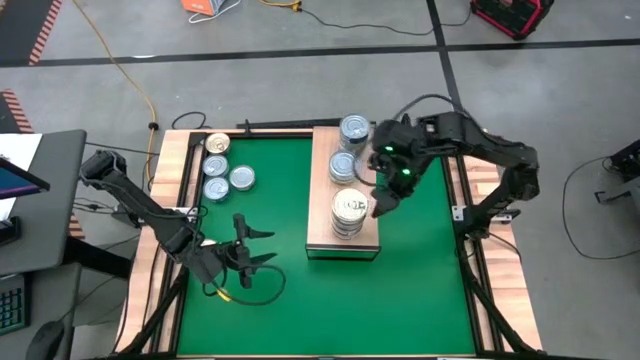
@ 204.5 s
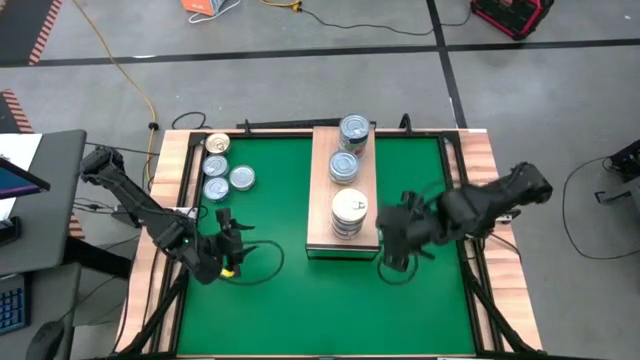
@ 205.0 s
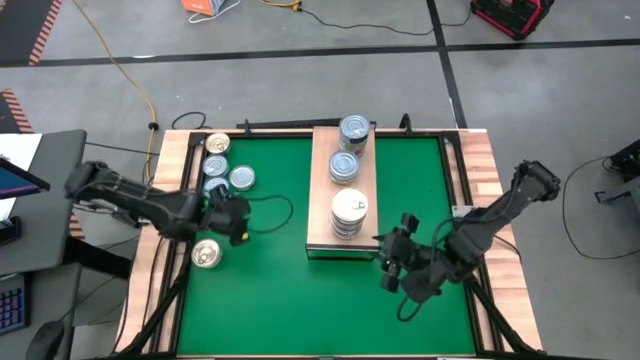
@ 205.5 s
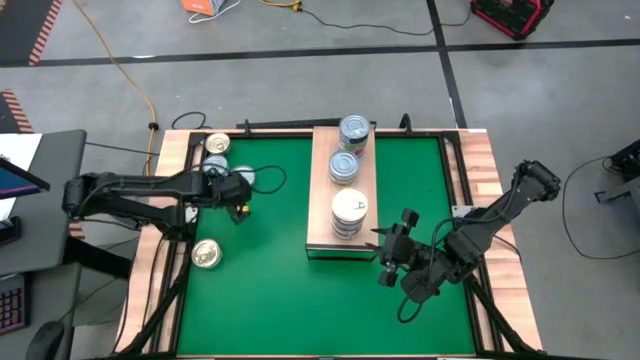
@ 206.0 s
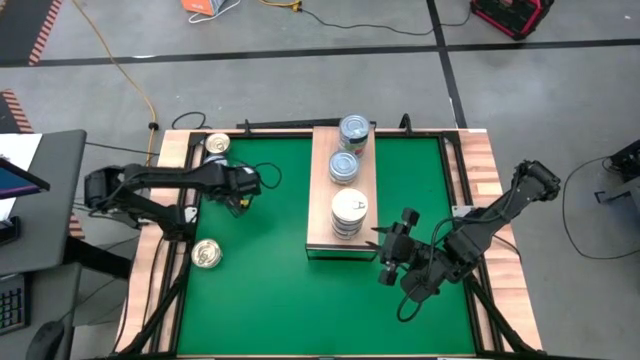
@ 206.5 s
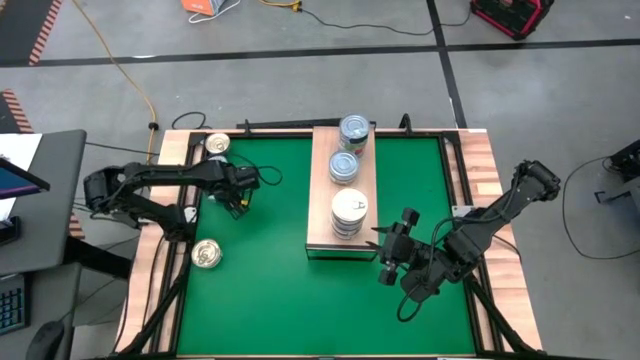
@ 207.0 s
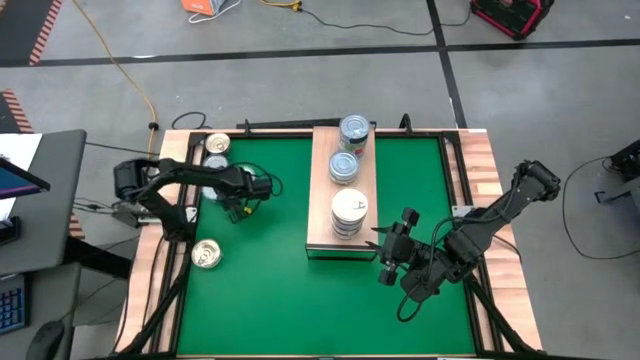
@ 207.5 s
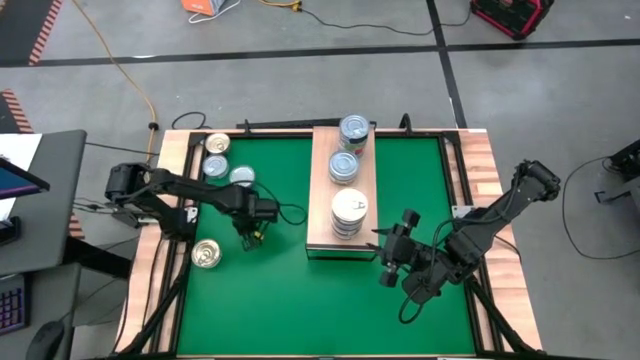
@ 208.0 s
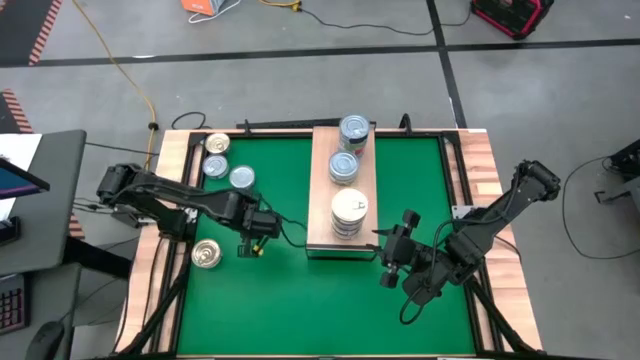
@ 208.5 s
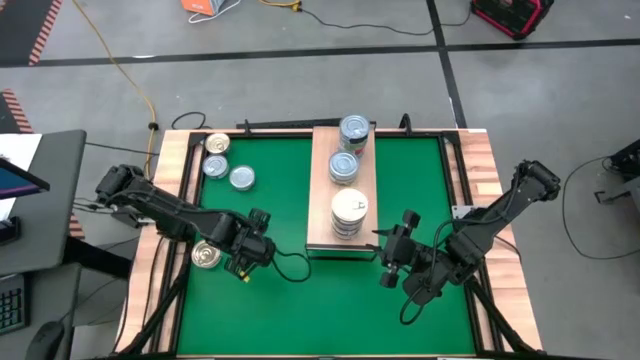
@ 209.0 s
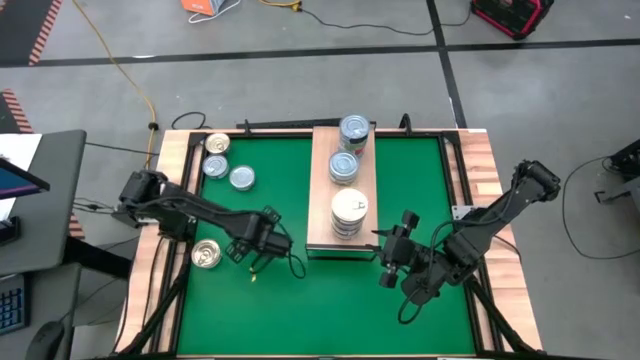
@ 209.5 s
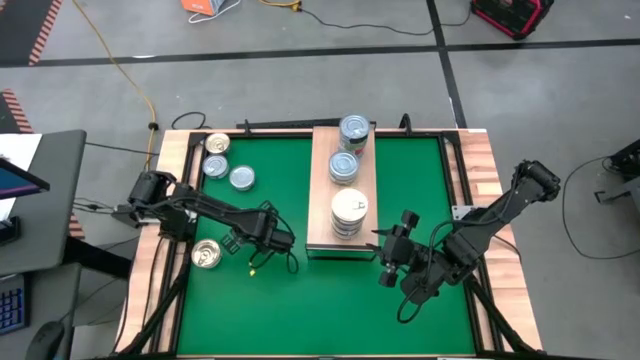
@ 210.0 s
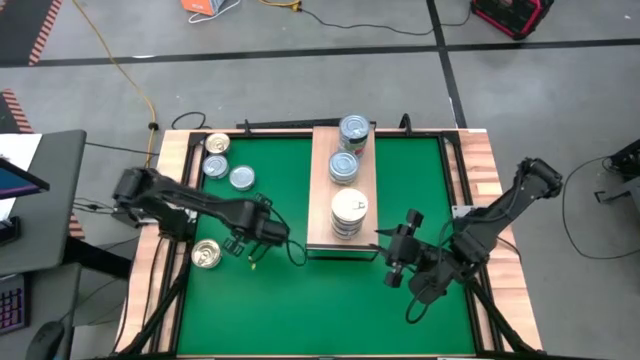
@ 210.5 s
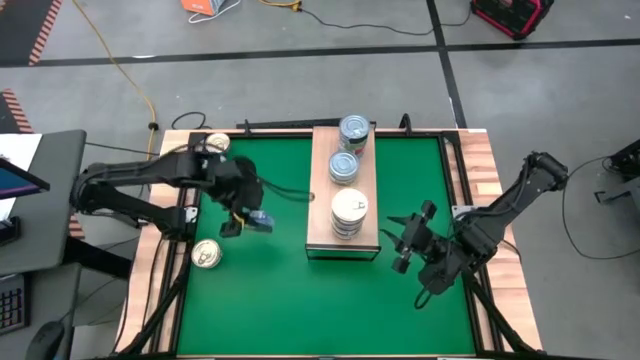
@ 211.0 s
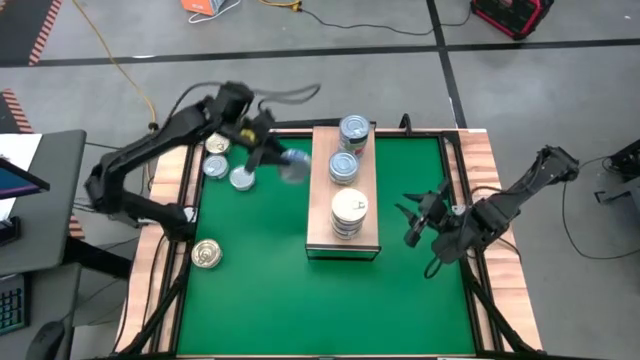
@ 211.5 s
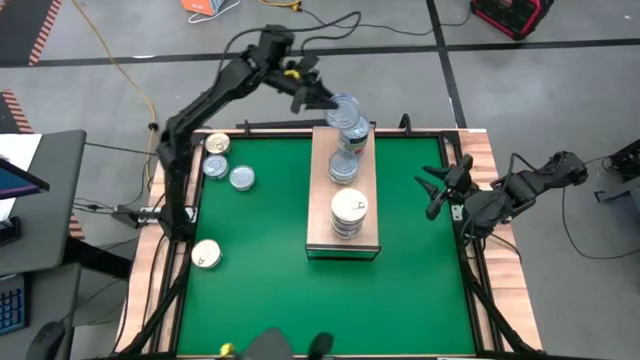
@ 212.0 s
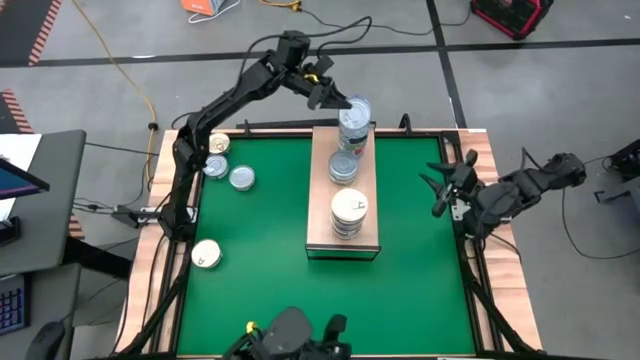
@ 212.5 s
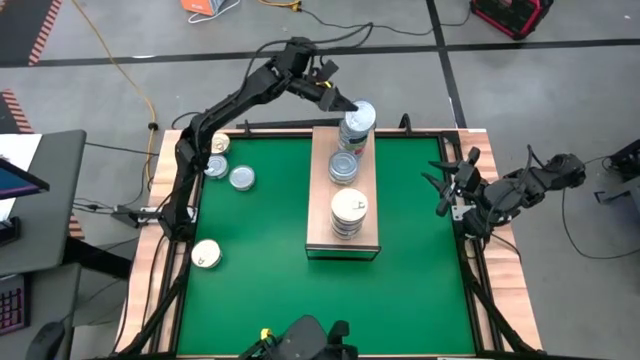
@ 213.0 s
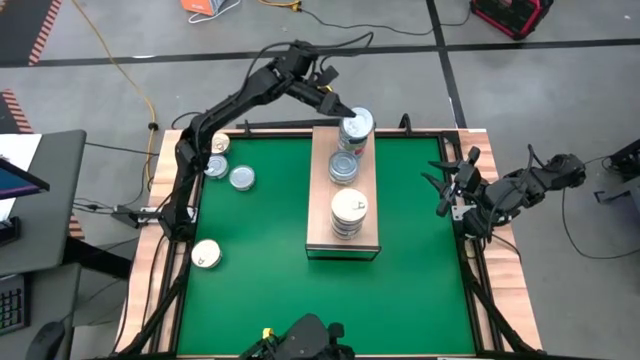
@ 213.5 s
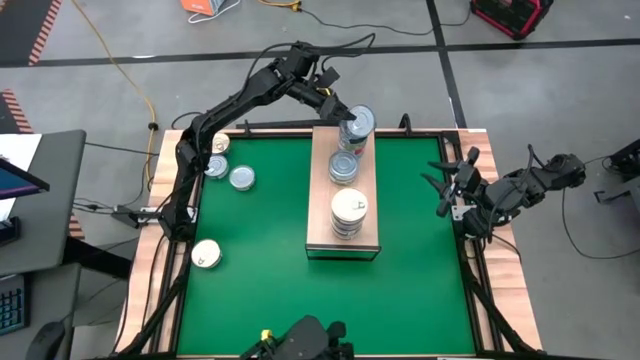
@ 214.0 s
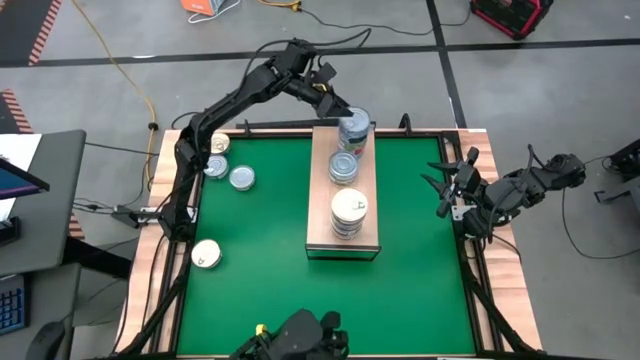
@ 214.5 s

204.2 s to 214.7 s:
Task: Stack canned seafood by type on shelf
Stack the blue tuna can on top of the blue tuna can on the shelf

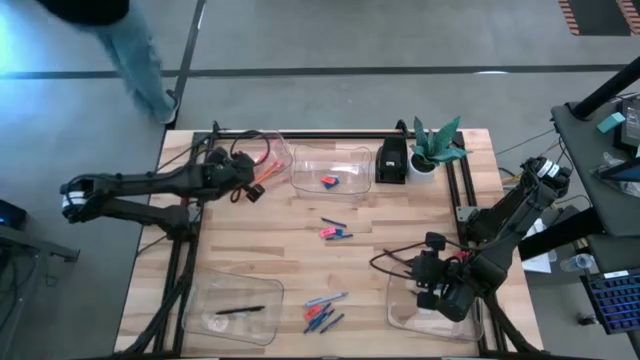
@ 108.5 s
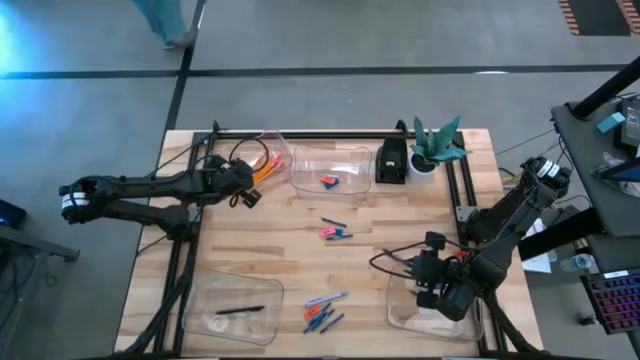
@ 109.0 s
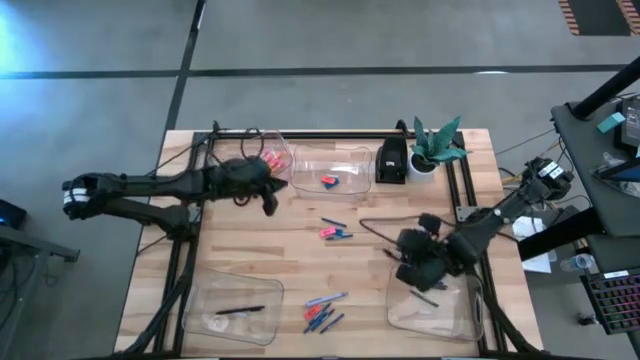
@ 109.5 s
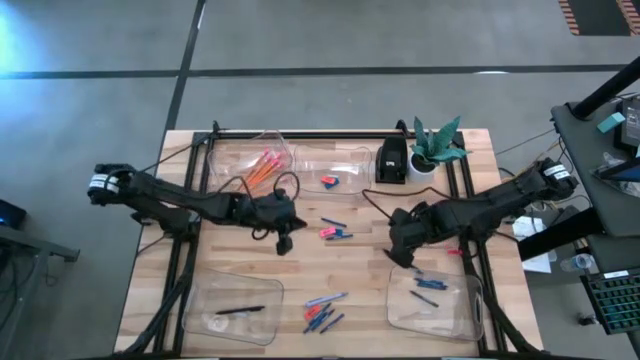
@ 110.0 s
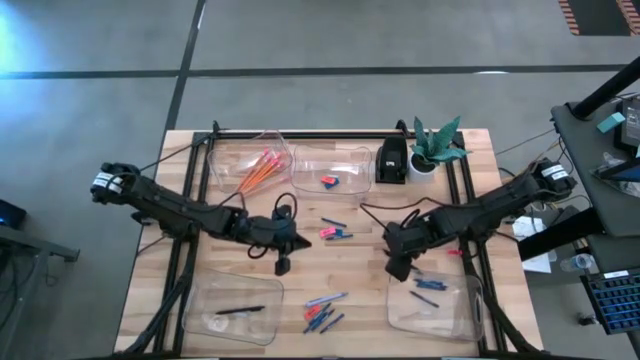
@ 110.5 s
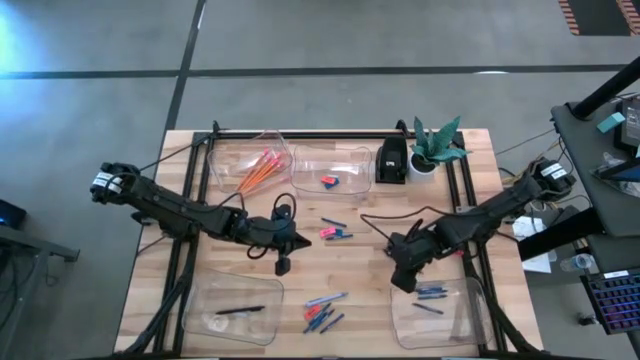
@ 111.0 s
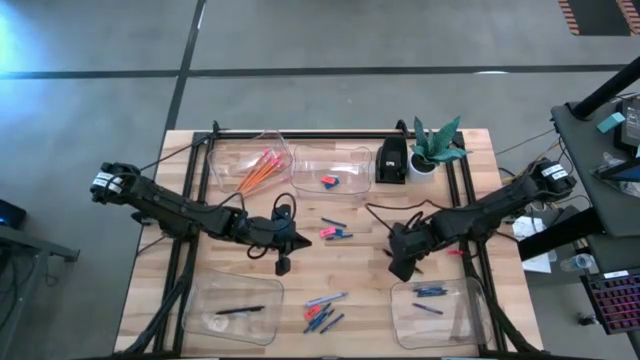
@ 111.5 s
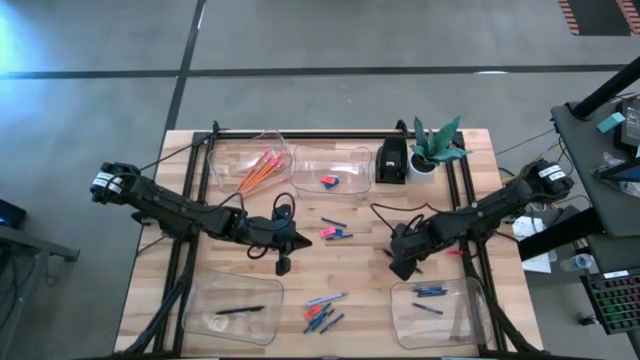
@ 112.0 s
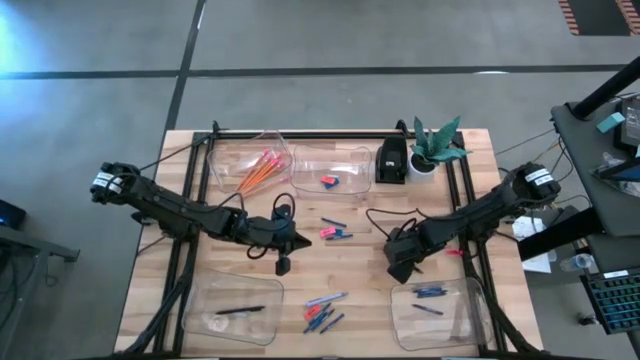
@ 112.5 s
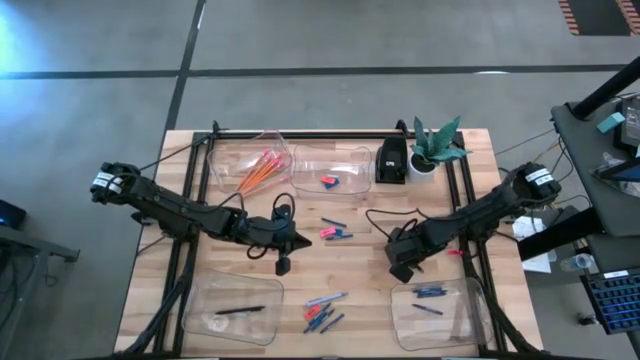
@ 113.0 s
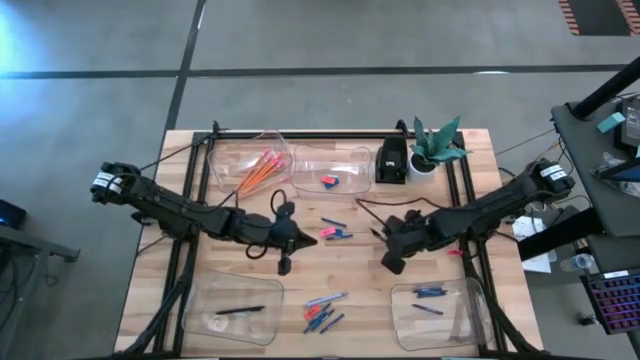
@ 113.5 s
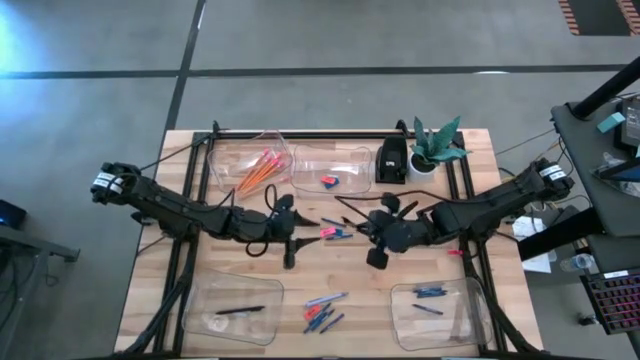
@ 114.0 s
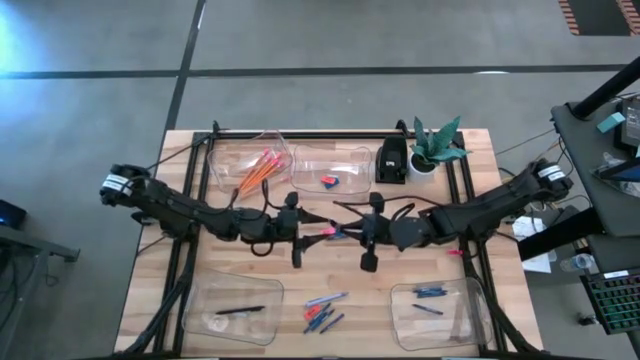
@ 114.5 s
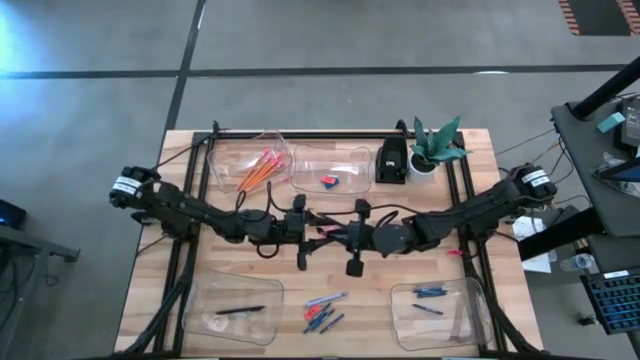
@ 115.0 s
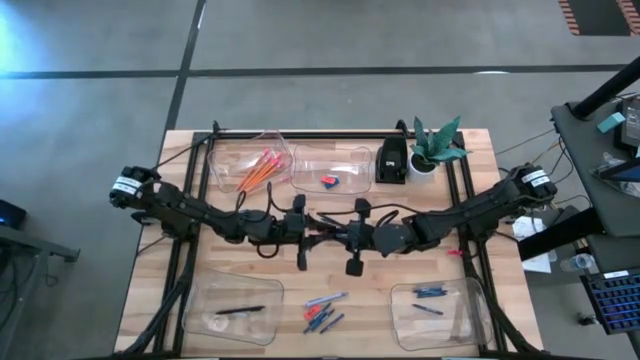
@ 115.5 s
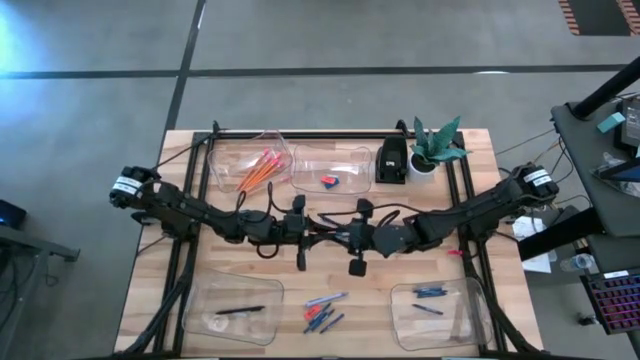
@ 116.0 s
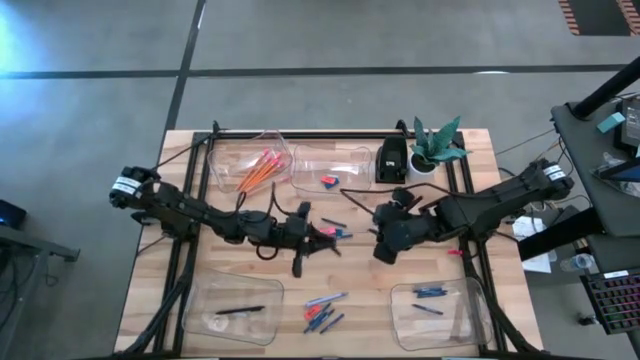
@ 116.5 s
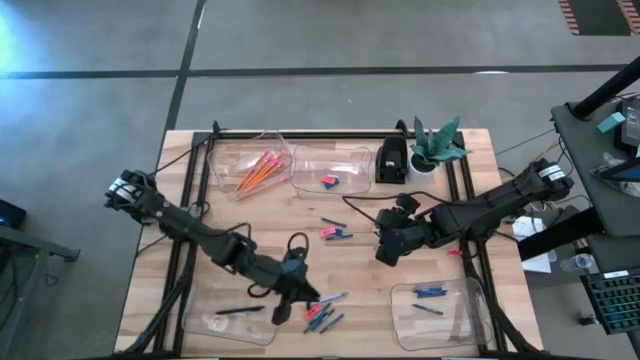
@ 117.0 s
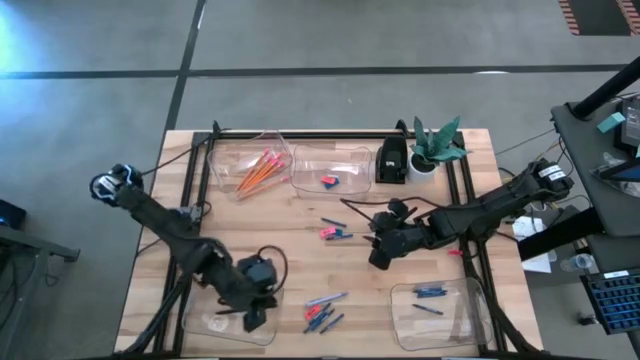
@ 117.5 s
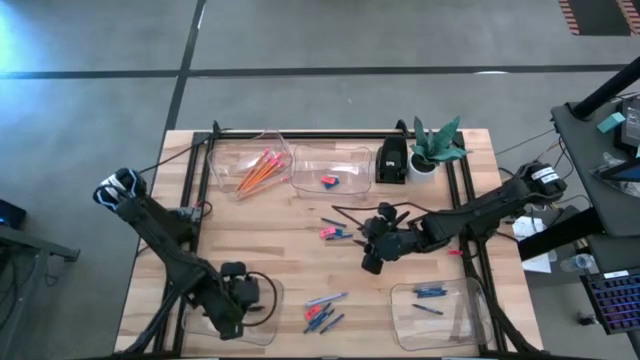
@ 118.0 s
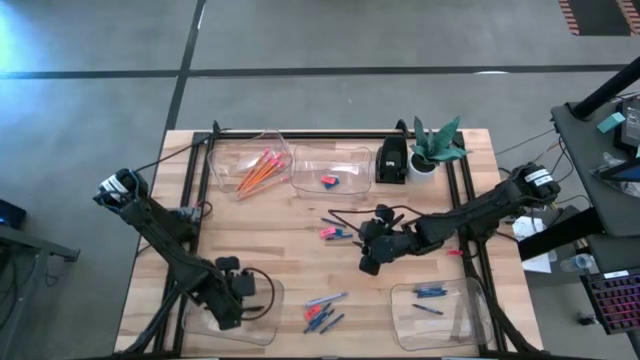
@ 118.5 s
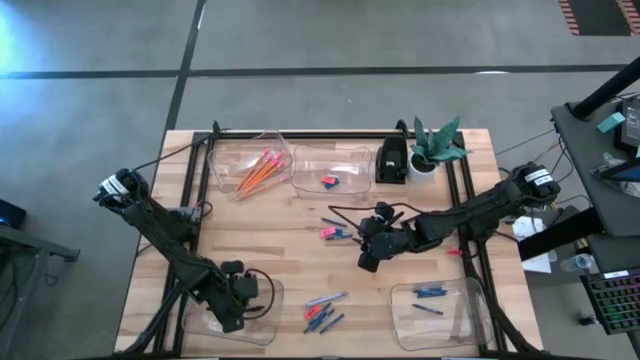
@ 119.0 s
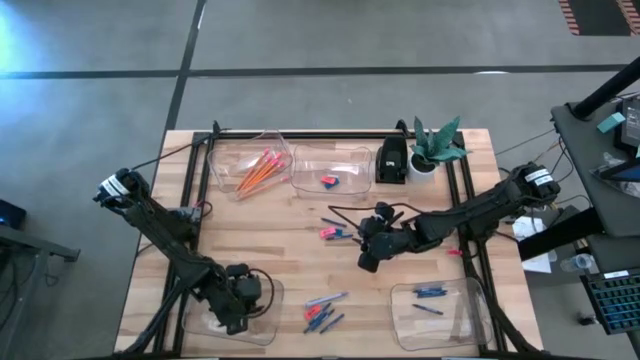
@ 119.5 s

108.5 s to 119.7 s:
Task: Sort crayons/erasers/pens/pencils in bins
Put the black pen into the bottom left transparent bin
